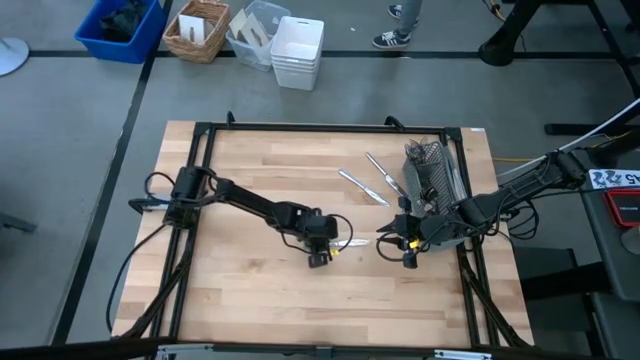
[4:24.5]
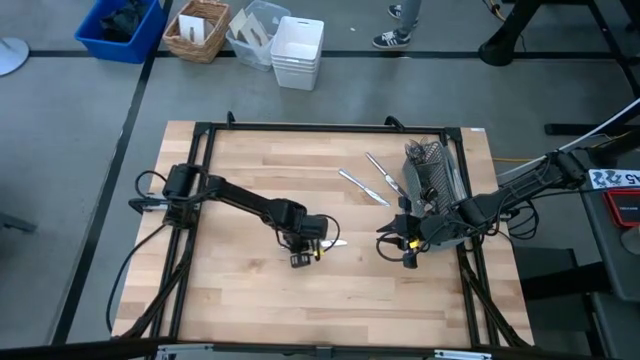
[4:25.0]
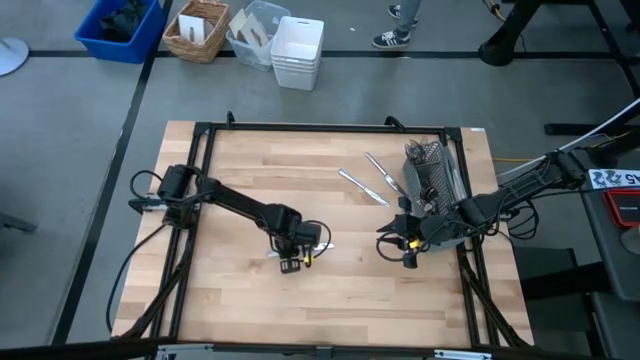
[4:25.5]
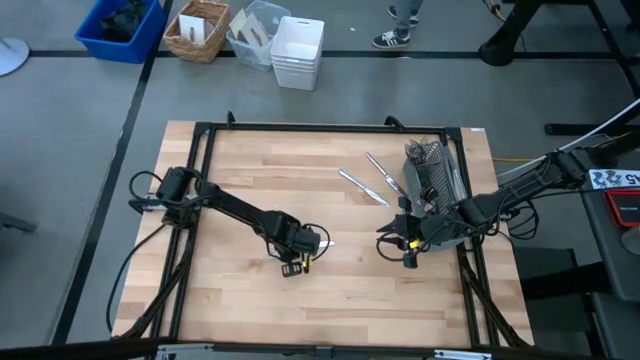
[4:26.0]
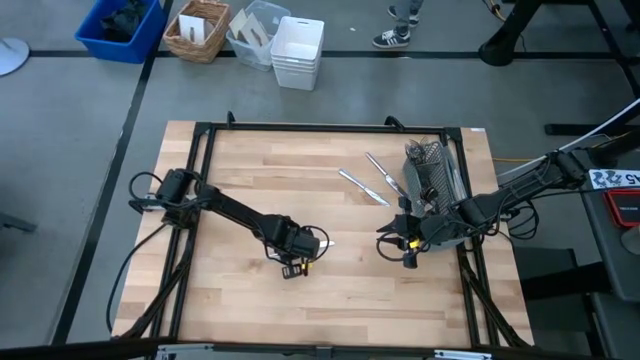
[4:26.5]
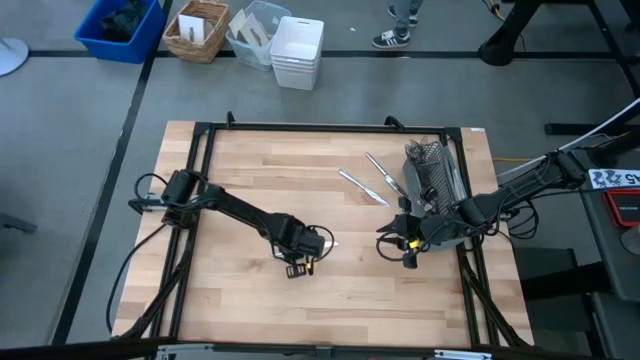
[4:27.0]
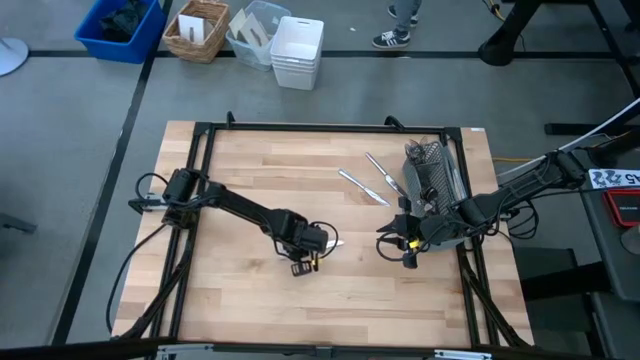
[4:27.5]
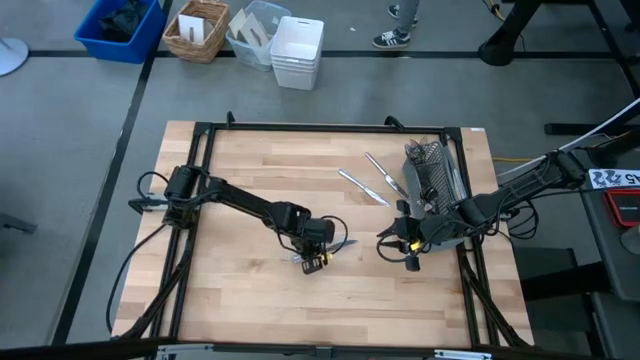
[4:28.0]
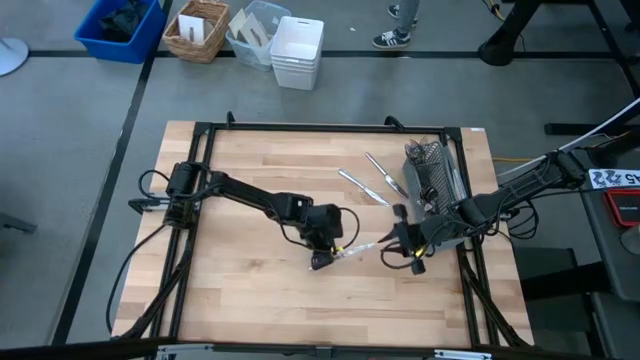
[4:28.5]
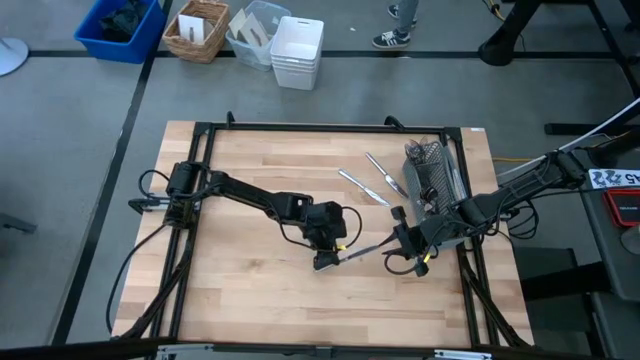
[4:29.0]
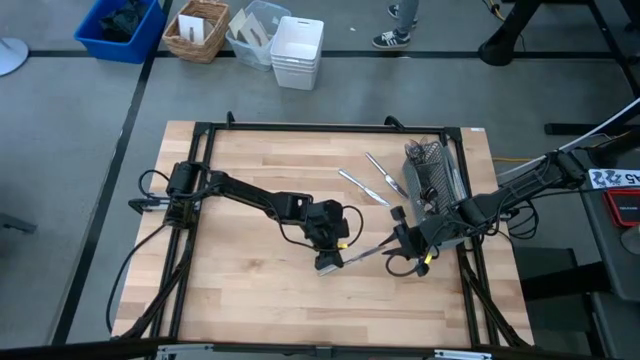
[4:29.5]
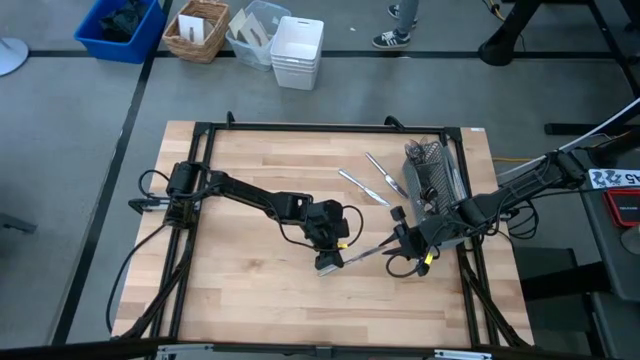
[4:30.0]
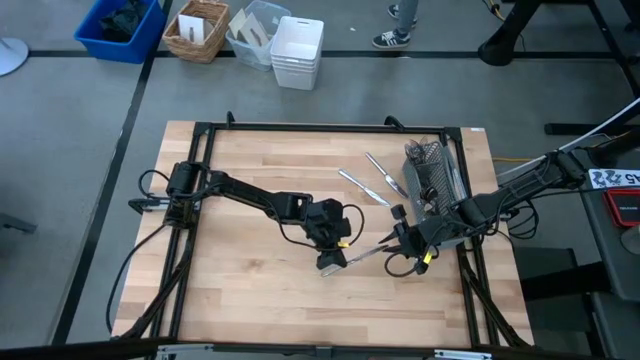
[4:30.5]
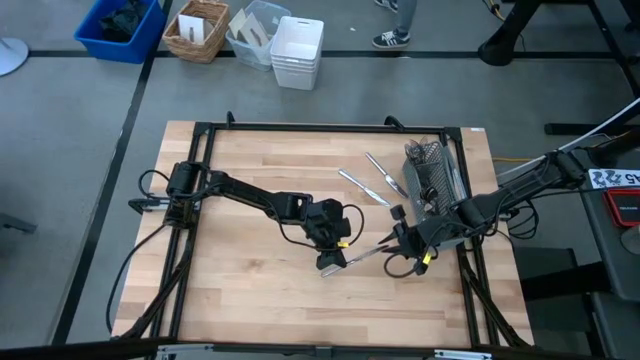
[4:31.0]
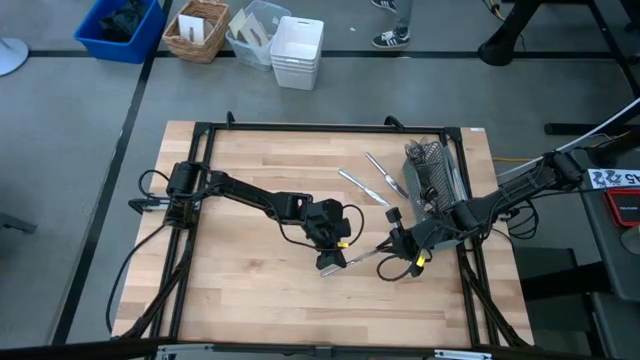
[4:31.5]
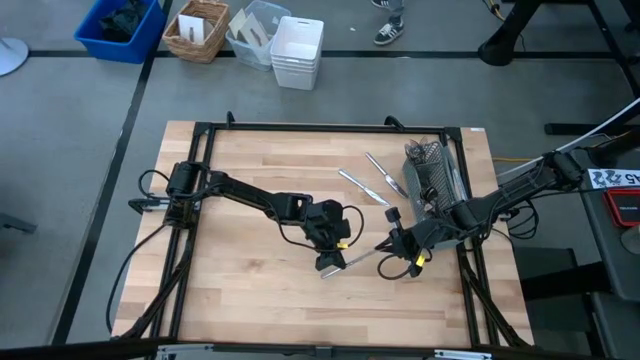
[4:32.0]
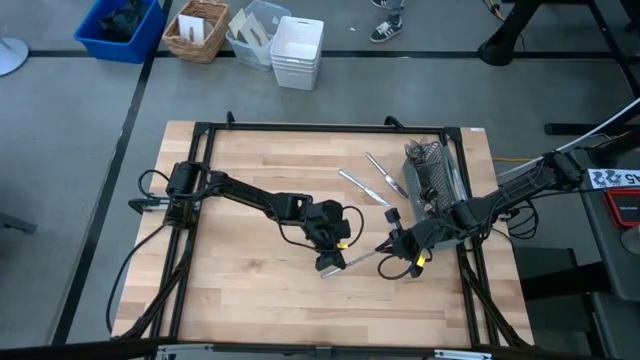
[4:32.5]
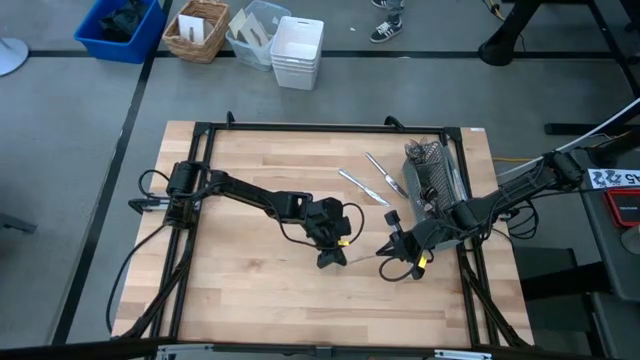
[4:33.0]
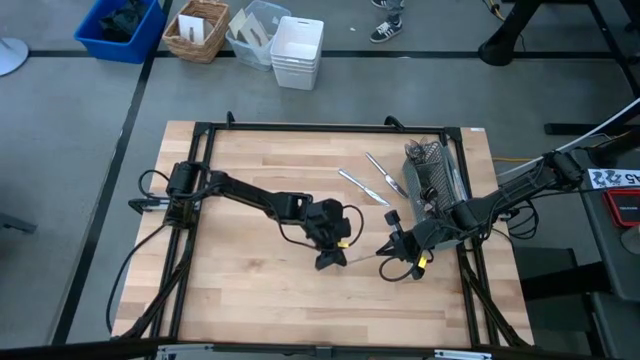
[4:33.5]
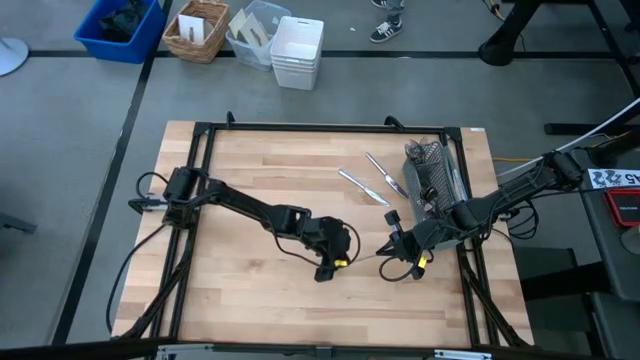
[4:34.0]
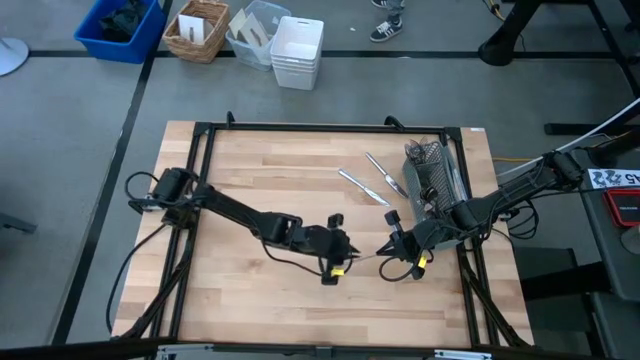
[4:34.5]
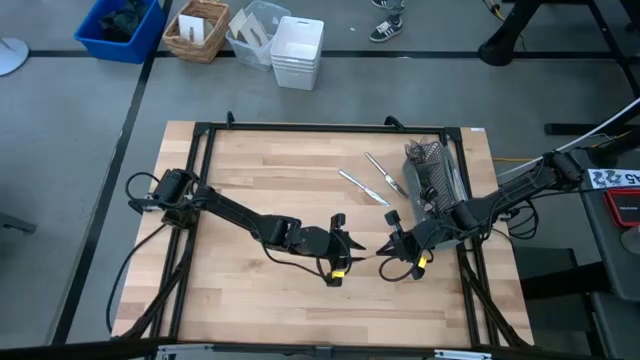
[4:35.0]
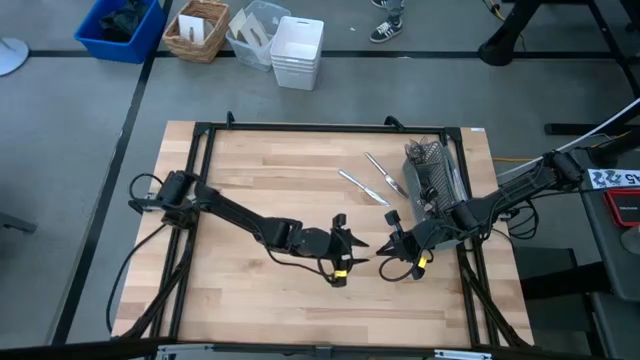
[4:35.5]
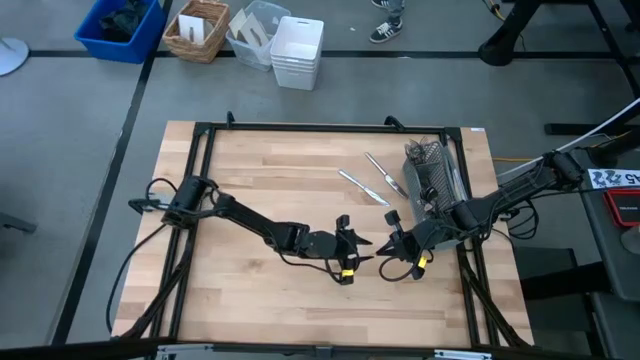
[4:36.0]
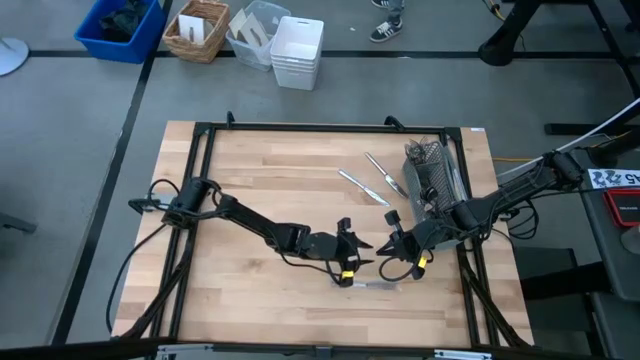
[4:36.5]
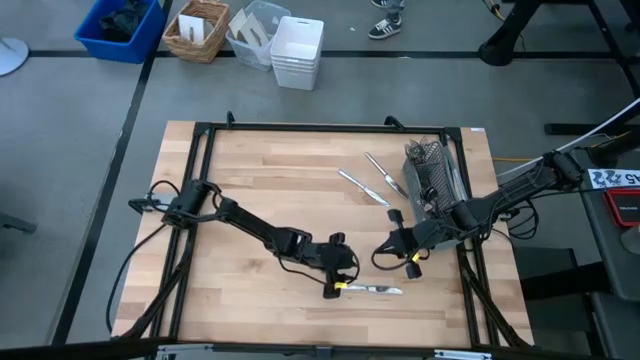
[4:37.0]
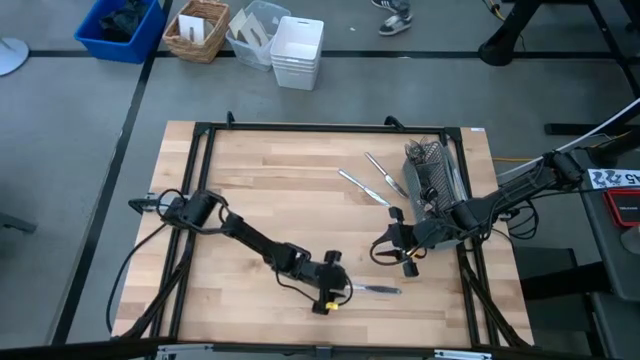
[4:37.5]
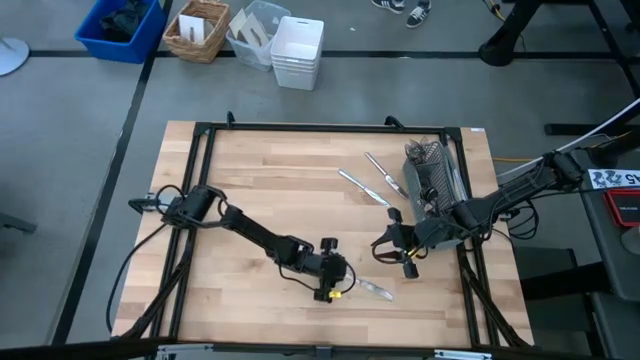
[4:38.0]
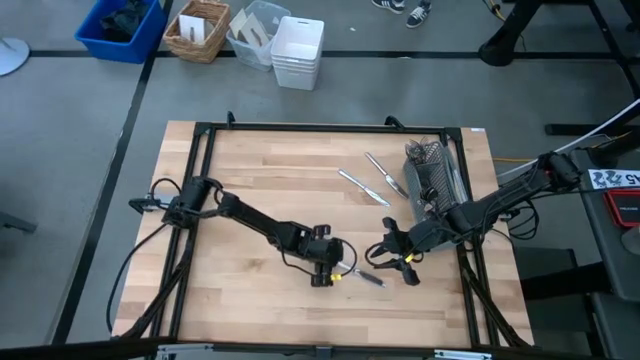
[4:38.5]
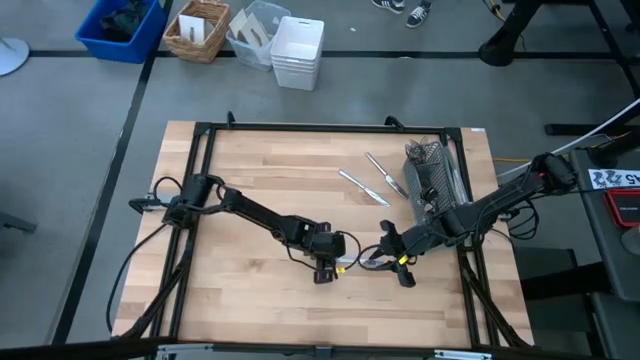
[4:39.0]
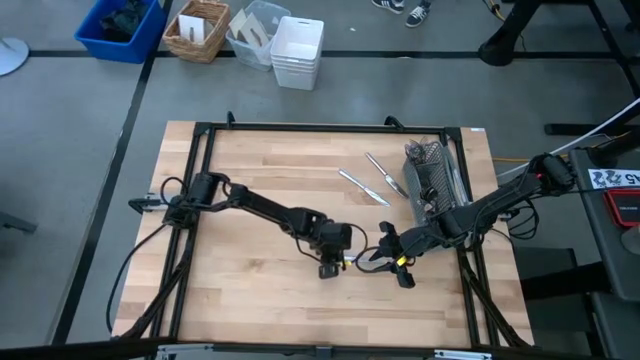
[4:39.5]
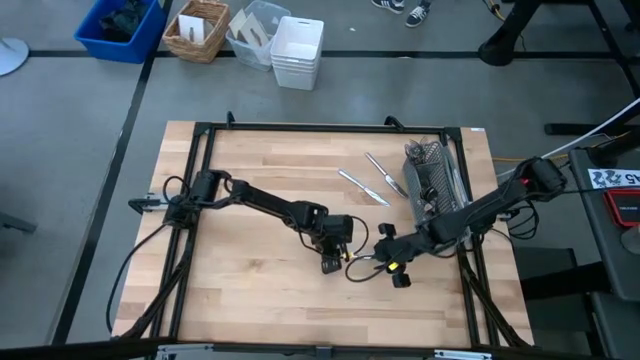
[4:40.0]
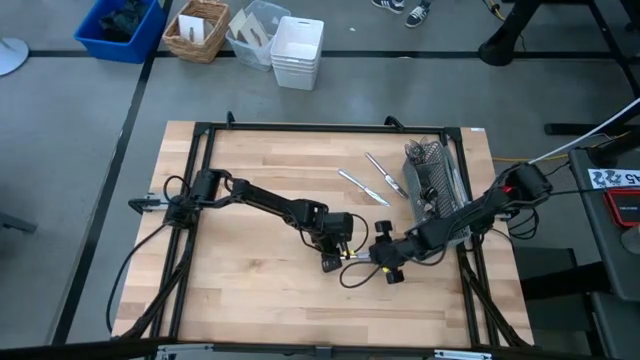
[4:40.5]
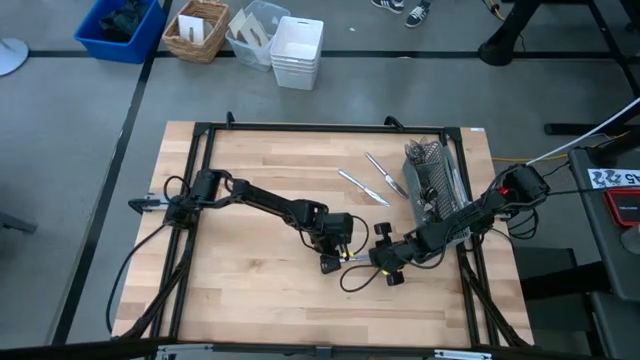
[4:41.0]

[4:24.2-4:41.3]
Task: Sort silverware
Put the bottom knife into the middle section of the utensil holder

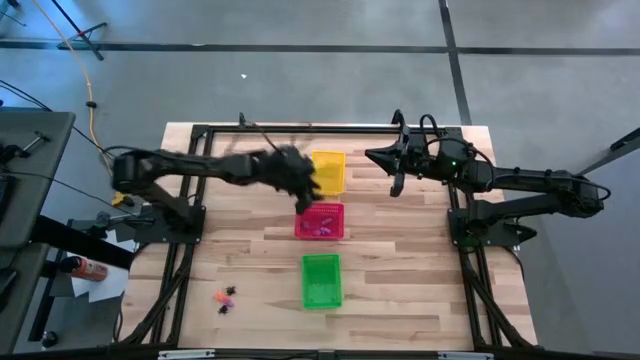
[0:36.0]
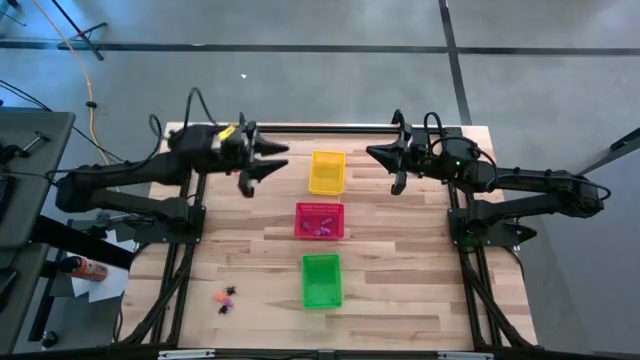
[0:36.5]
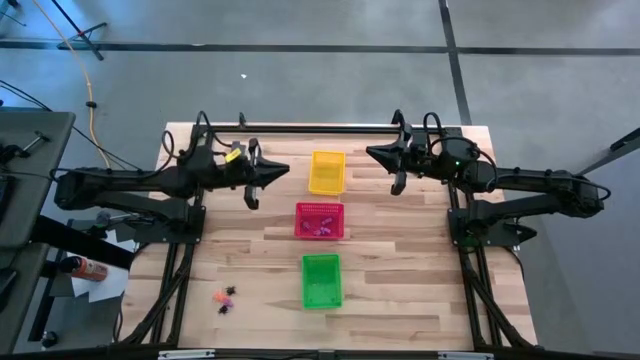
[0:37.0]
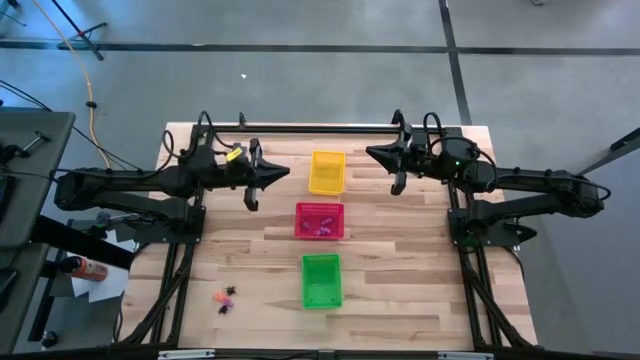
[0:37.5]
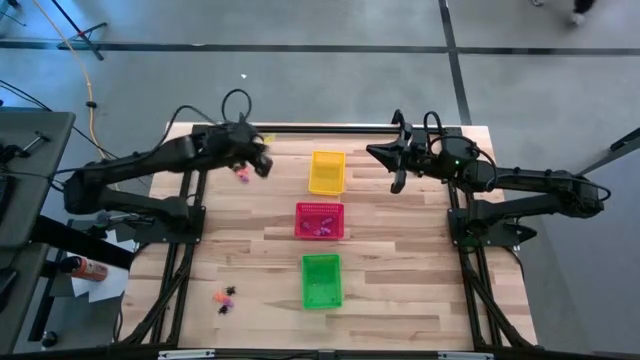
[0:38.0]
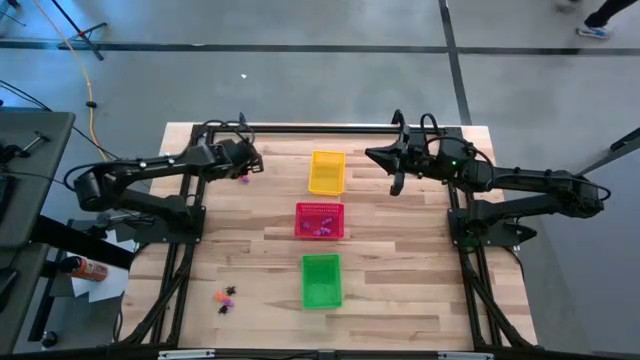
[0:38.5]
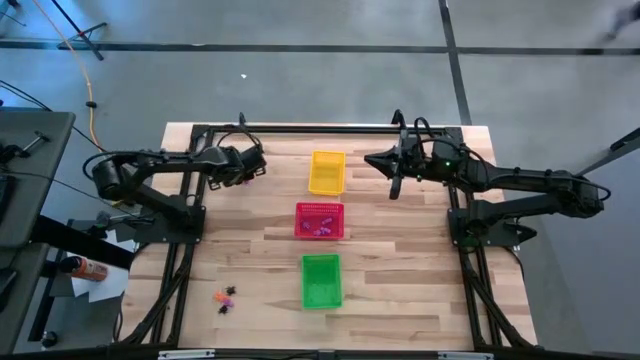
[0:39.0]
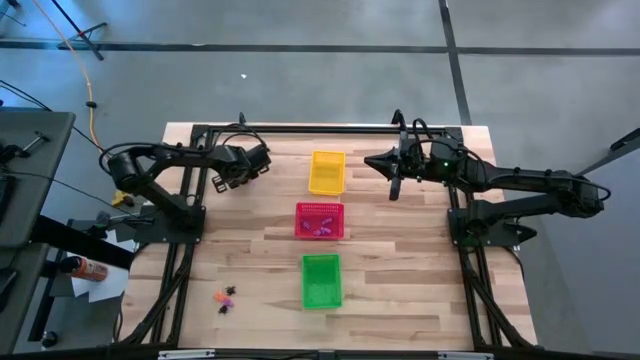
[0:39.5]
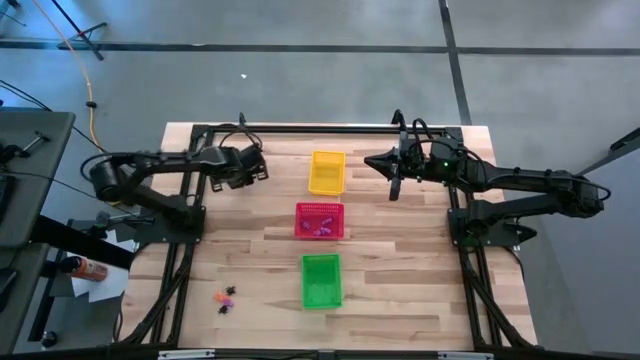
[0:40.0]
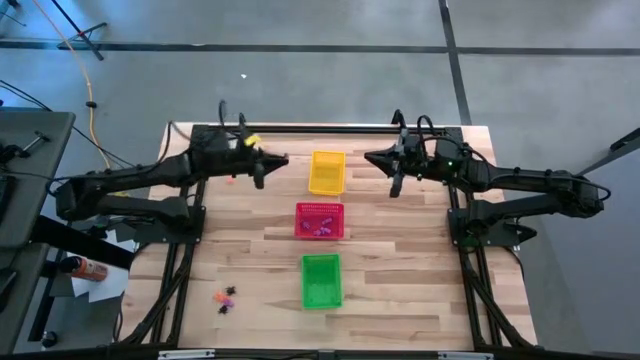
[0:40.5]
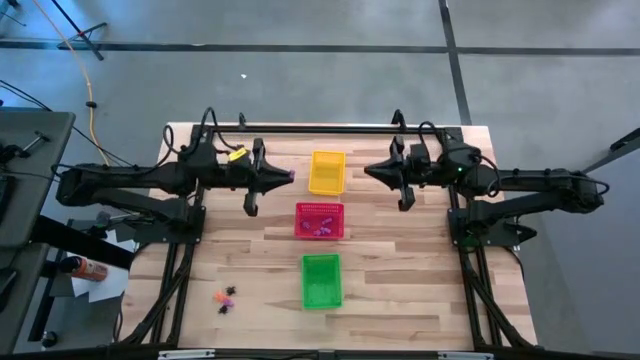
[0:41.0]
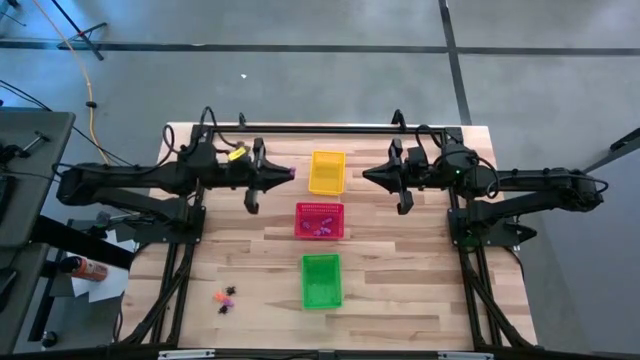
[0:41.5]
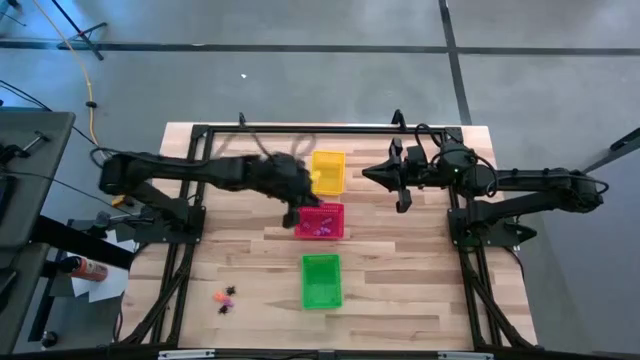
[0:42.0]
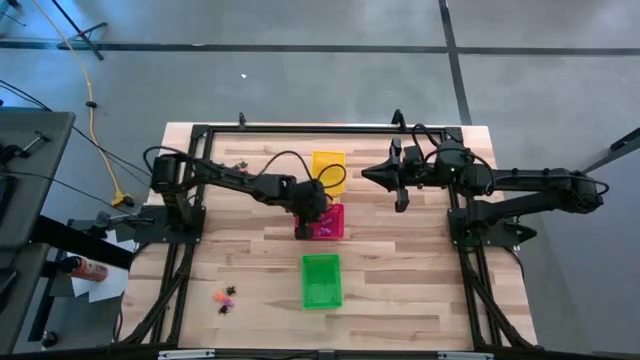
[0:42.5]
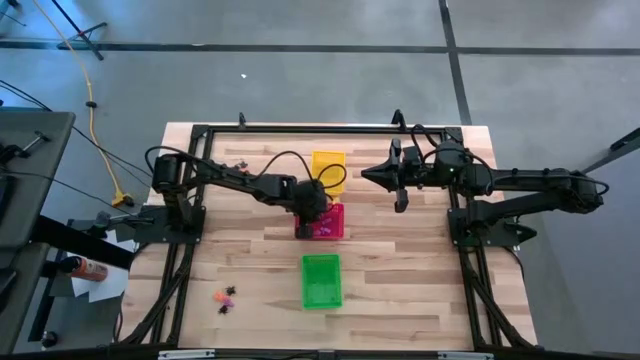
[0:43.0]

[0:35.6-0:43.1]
Task: Sort Halloween decoration
Put the purple skeleton toy into the red bin
